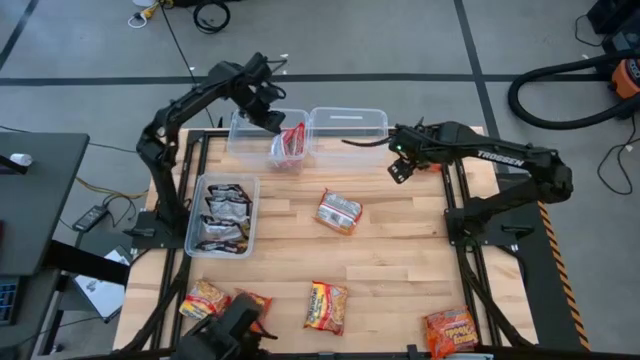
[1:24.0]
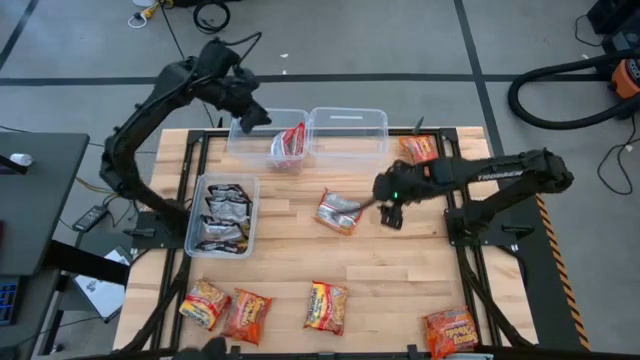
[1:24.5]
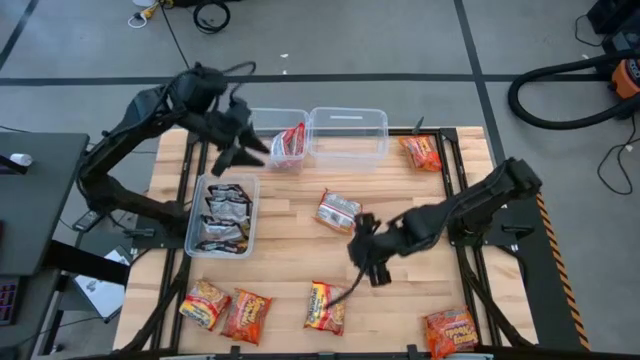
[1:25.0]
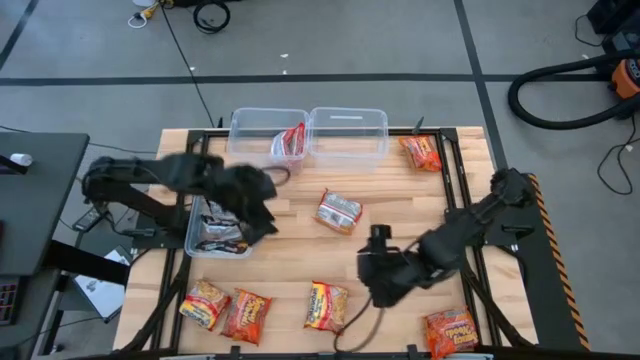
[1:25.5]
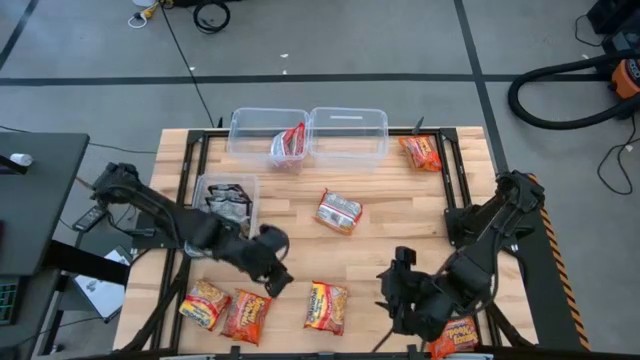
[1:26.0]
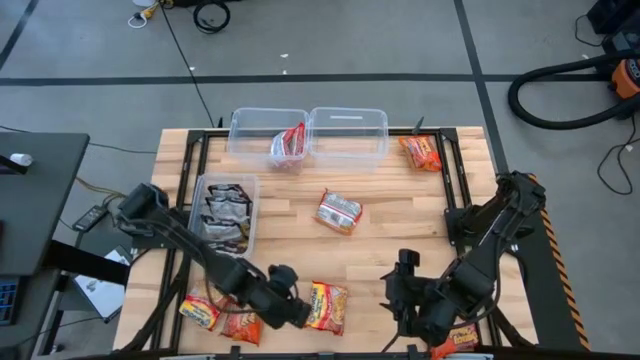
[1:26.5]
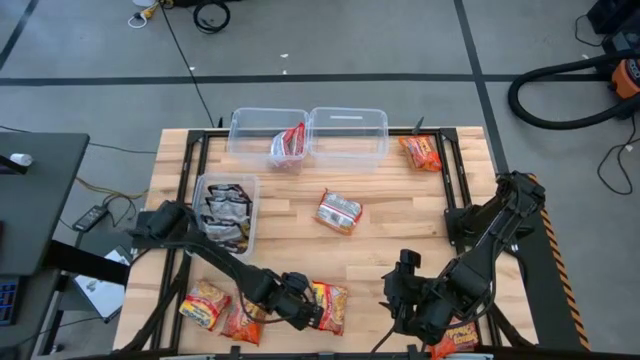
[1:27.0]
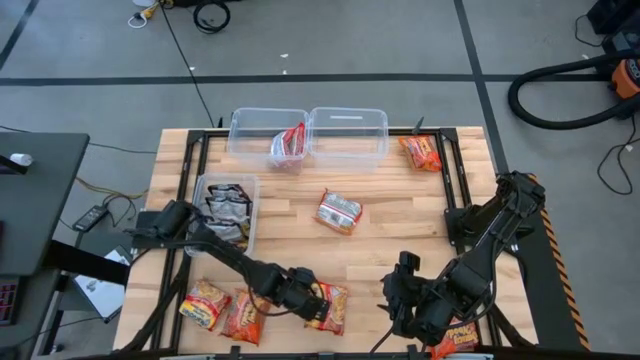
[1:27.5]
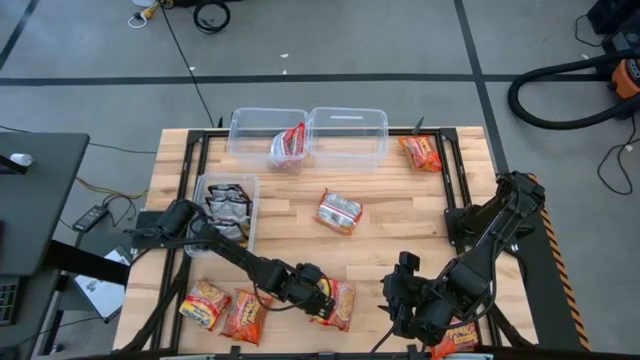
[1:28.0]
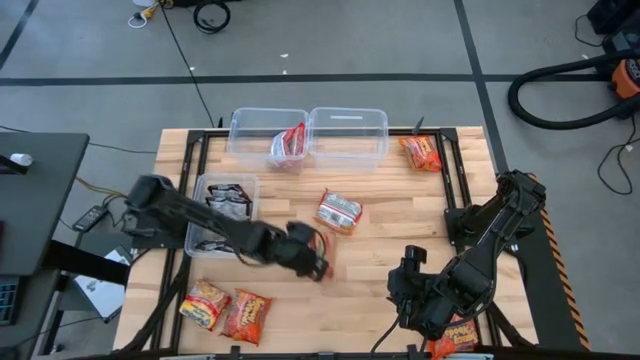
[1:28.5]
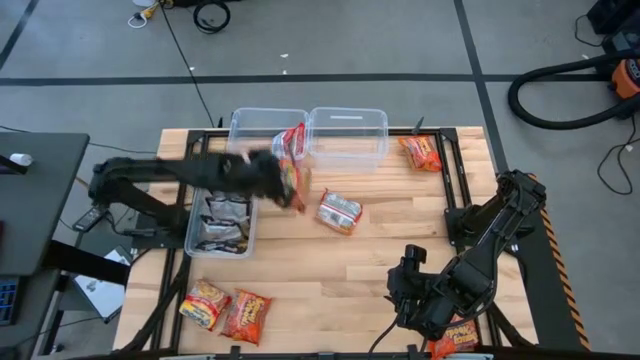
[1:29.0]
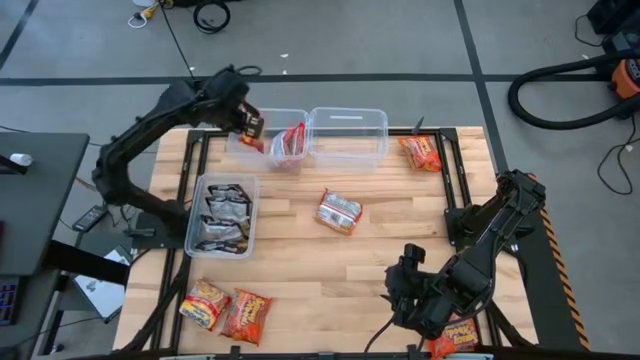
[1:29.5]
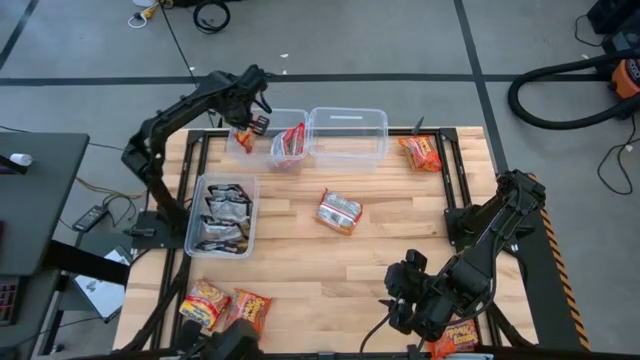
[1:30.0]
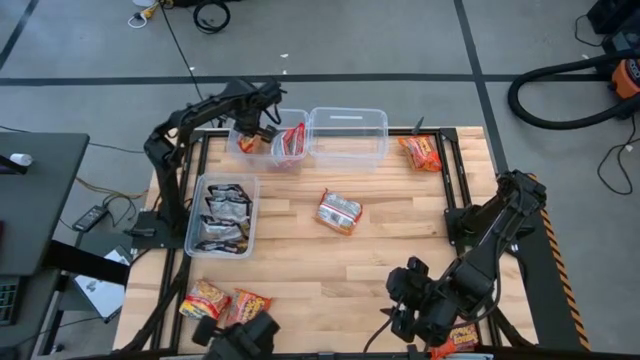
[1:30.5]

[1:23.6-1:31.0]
Task: Sort Maruchan noodles
Put the right red noodle pack into the top left transparent bin

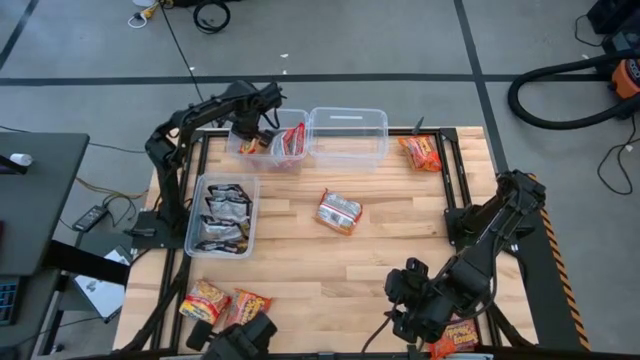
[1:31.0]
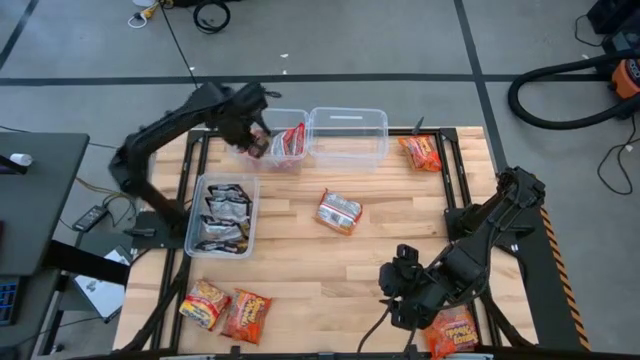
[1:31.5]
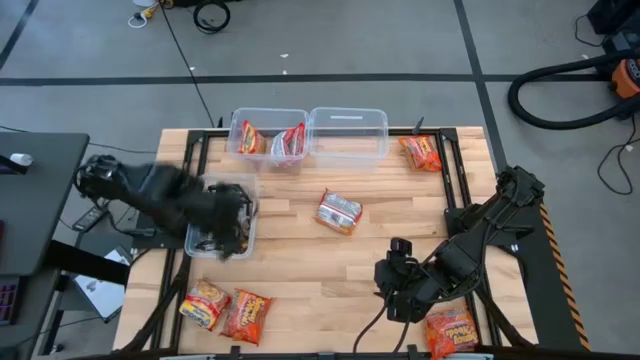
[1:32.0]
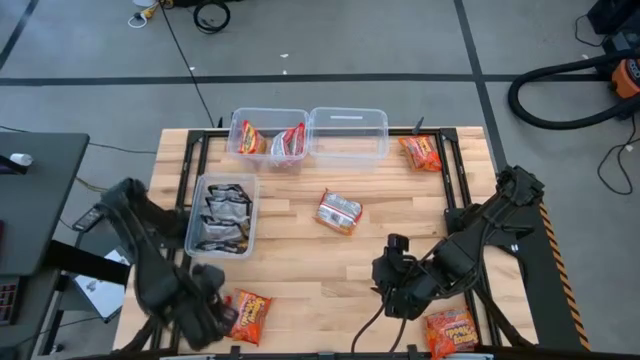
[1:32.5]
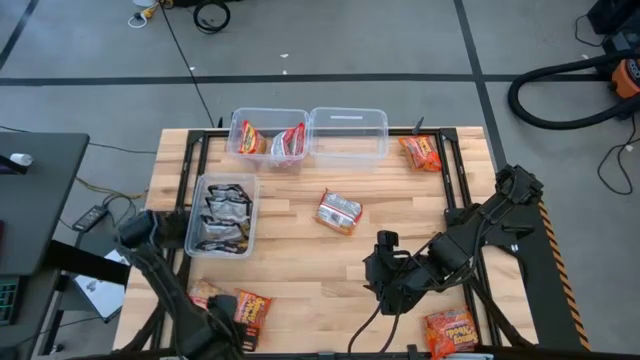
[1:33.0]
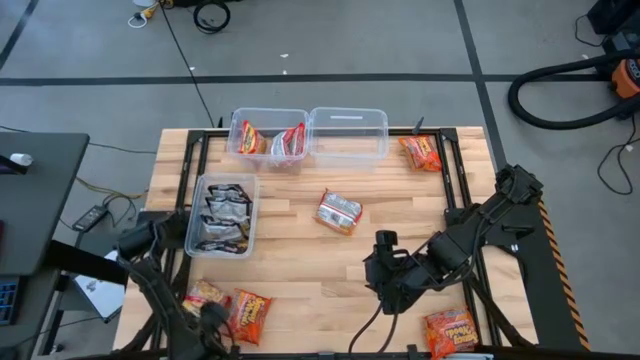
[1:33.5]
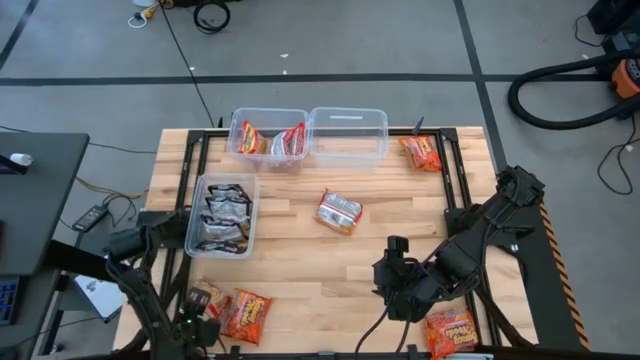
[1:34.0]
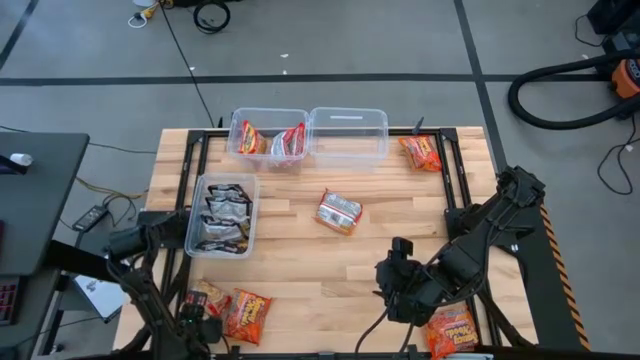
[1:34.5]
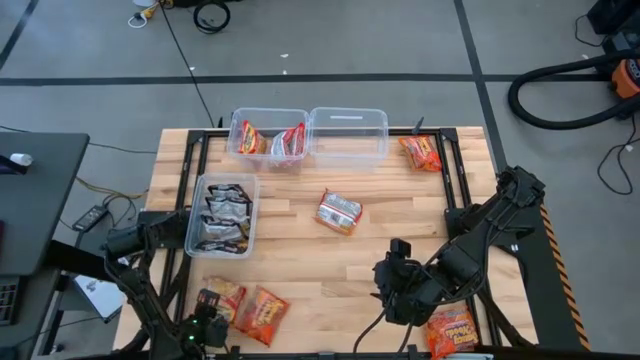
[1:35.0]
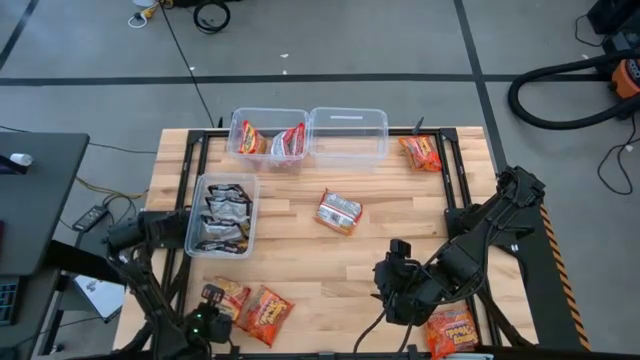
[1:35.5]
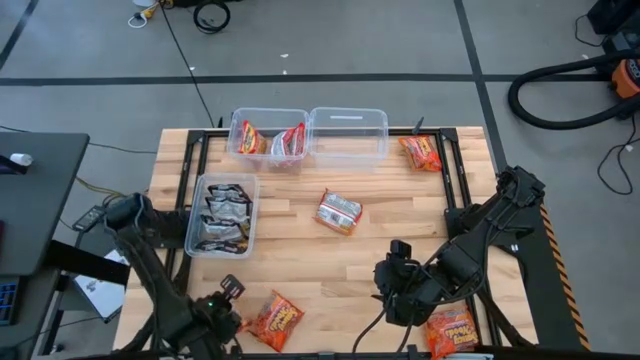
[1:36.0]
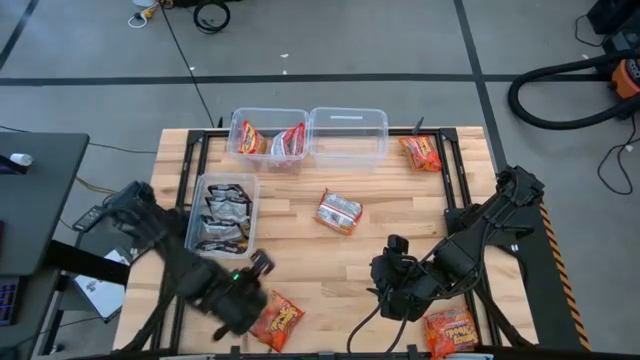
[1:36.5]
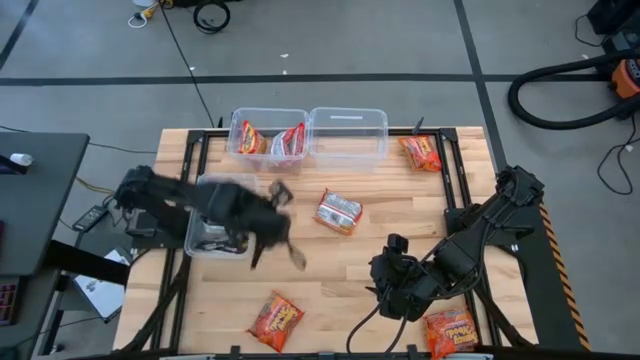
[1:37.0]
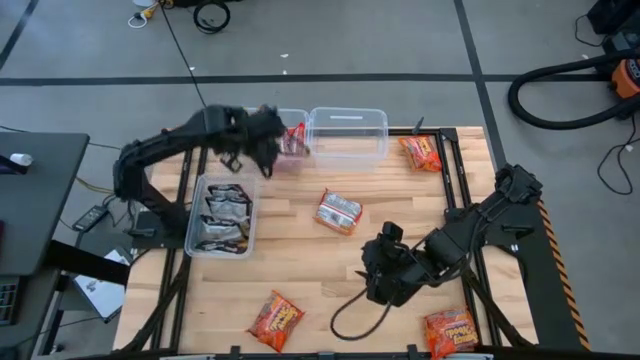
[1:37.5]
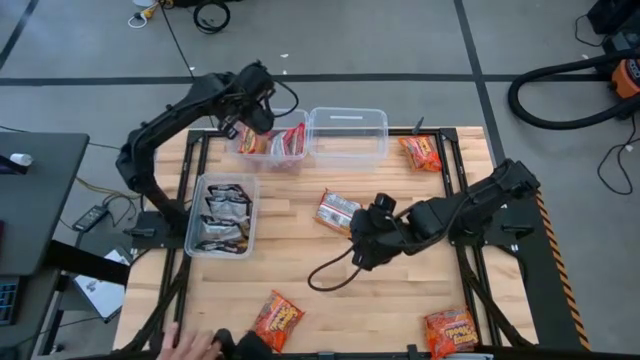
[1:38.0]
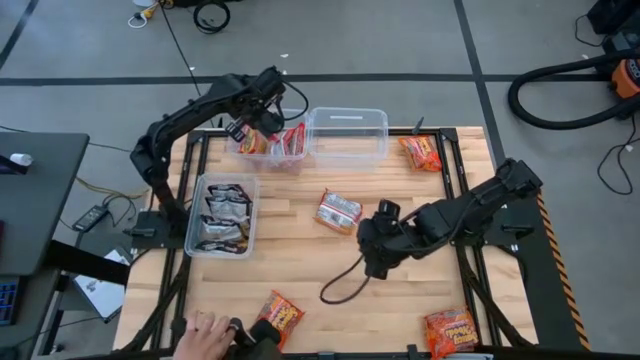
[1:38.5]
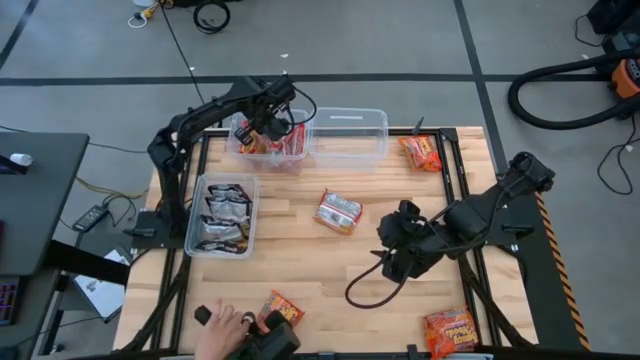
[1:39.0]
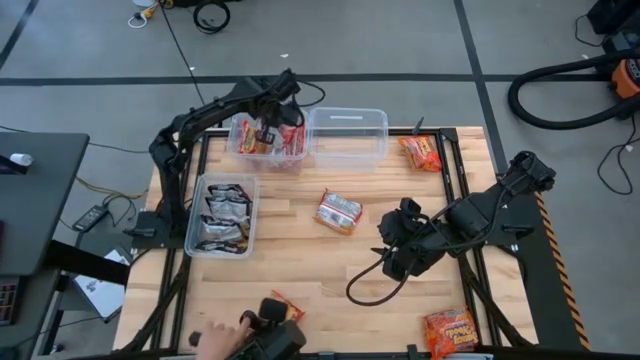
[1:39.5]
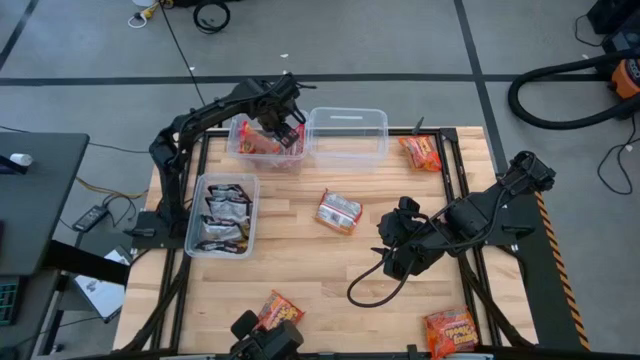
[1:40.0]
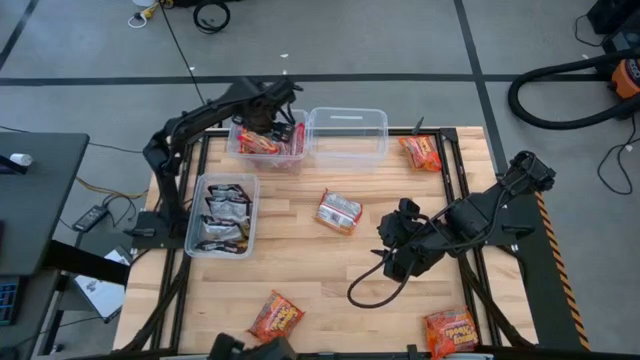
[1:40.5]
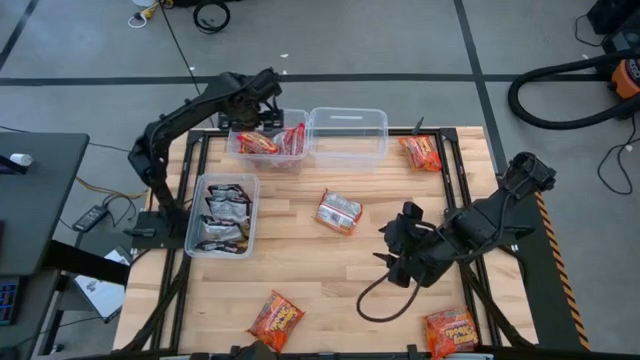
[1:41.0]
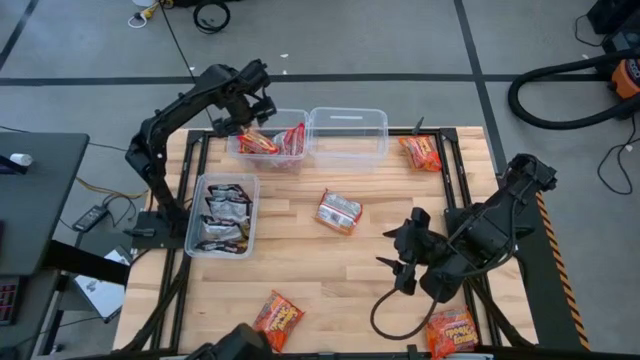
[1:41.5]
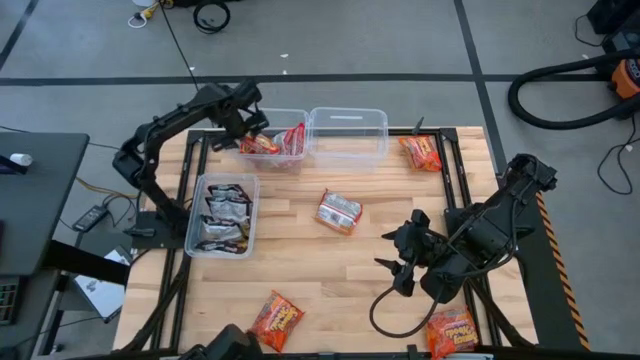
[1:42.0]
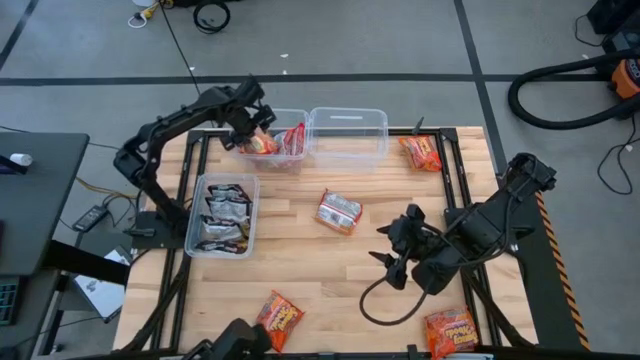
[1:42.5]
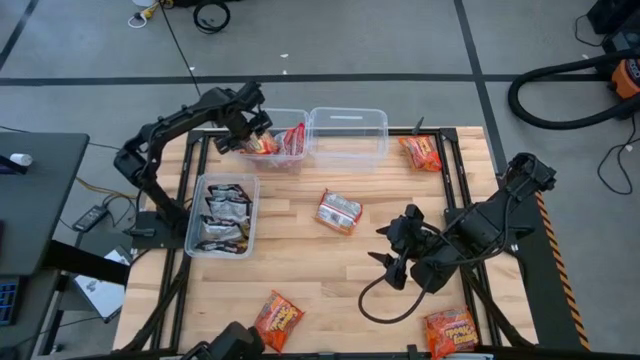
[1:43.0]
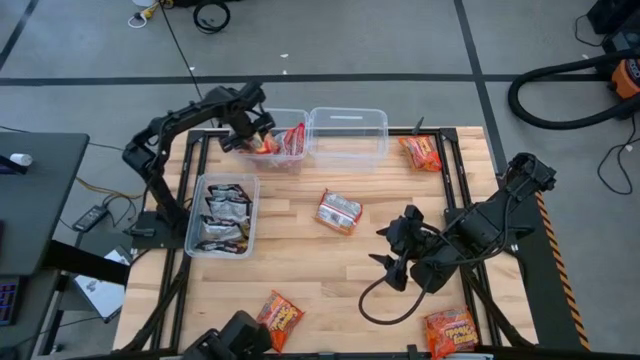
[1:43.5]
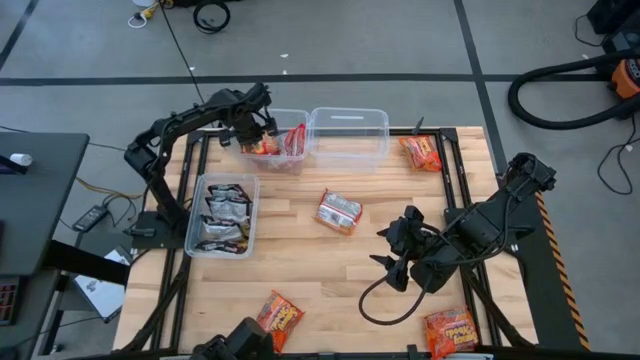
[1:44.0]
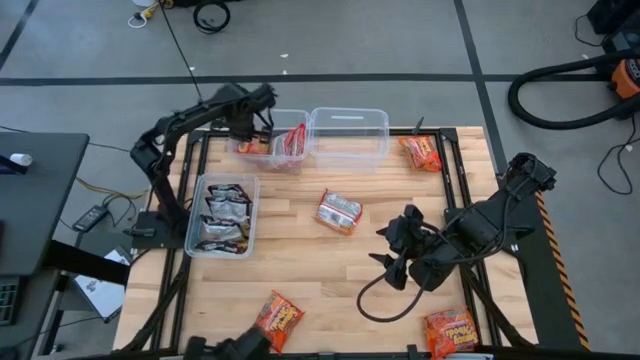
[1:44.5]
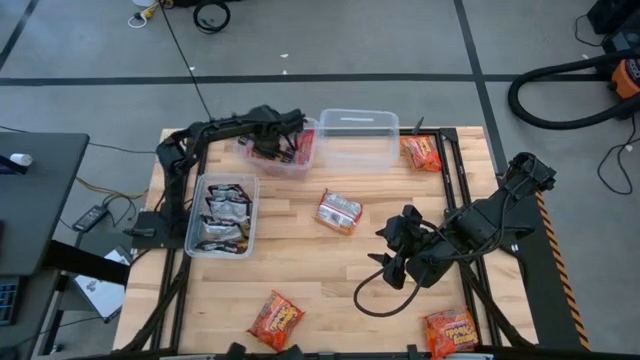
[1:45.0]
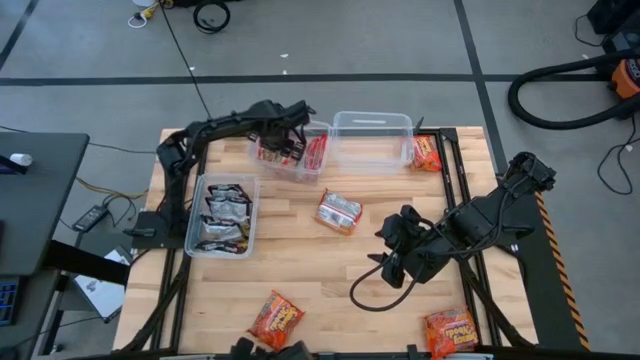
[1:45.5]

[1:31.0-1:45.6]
Put the bottom left red noodle pack into the top left transparent bin
